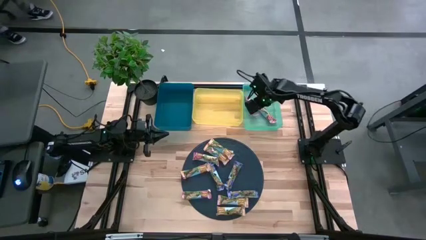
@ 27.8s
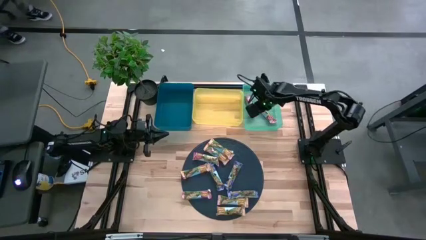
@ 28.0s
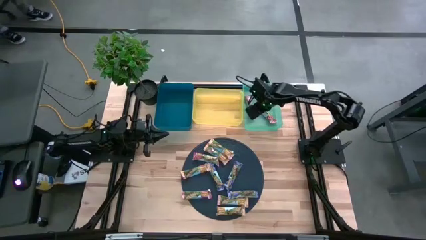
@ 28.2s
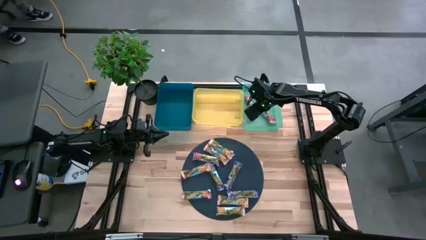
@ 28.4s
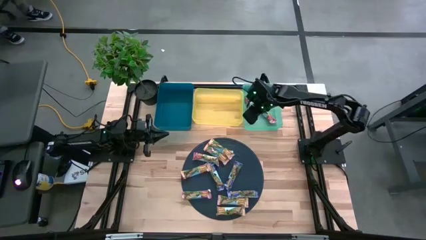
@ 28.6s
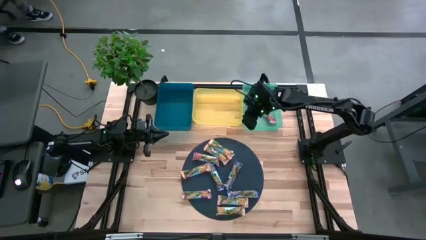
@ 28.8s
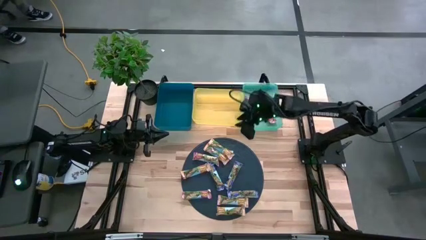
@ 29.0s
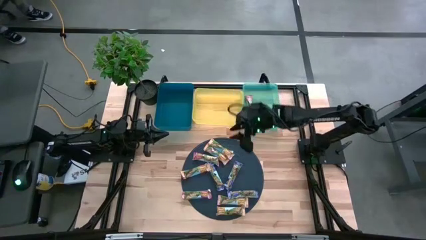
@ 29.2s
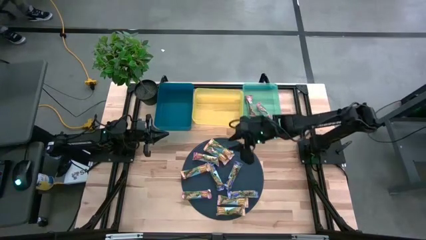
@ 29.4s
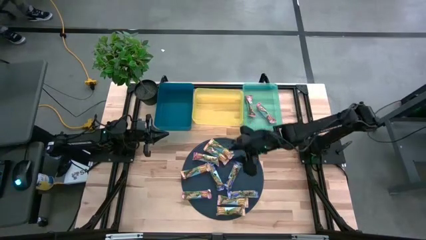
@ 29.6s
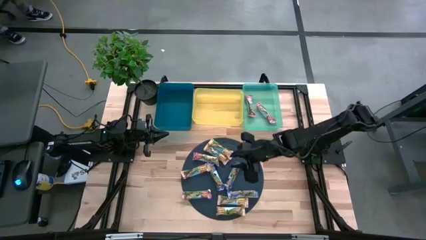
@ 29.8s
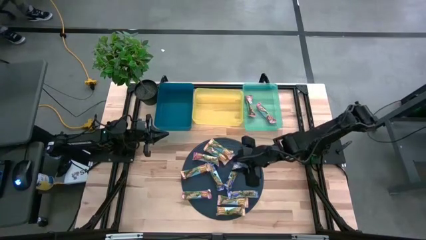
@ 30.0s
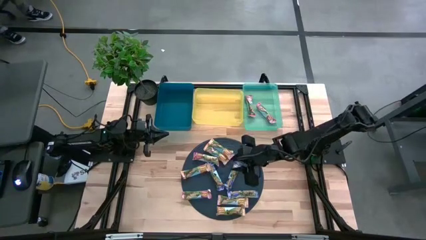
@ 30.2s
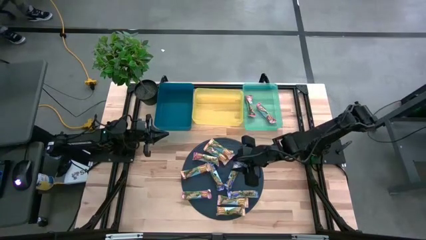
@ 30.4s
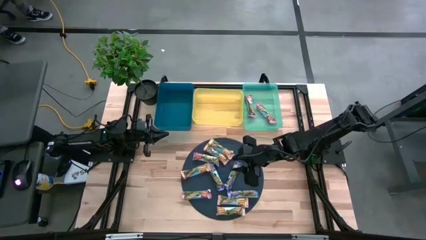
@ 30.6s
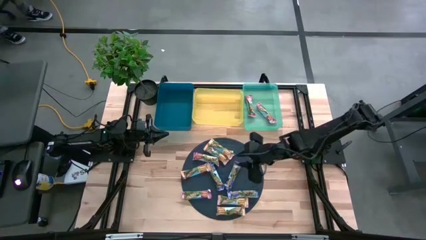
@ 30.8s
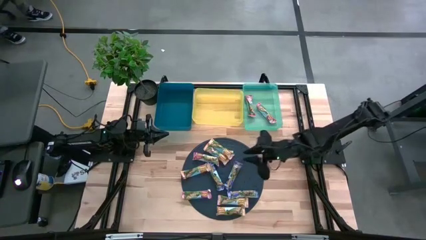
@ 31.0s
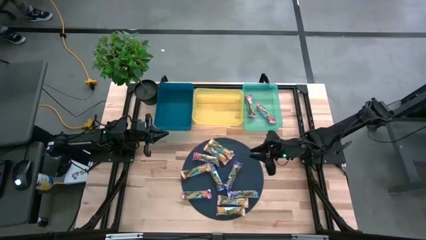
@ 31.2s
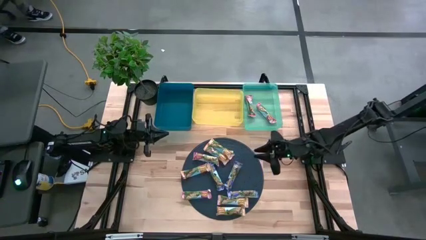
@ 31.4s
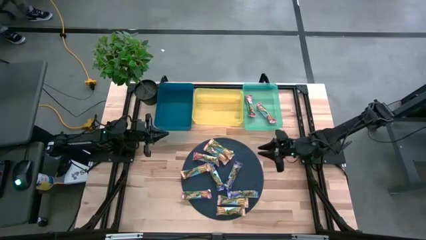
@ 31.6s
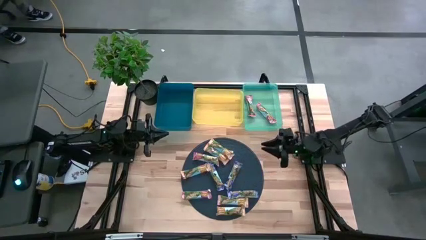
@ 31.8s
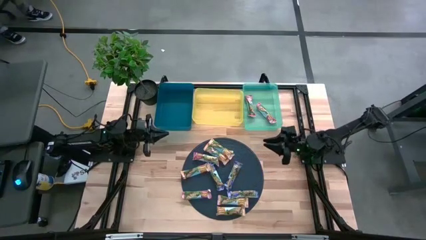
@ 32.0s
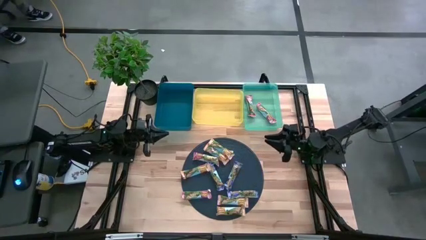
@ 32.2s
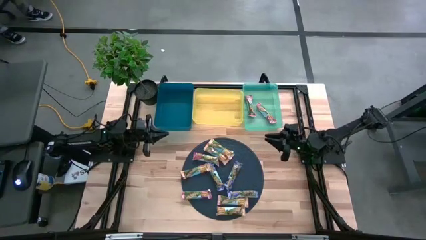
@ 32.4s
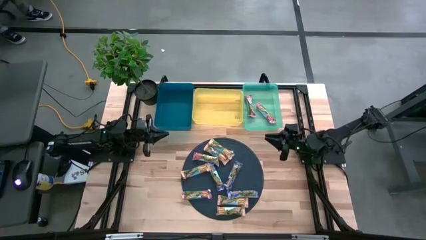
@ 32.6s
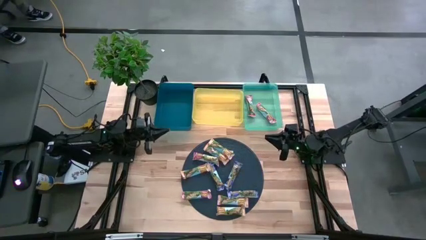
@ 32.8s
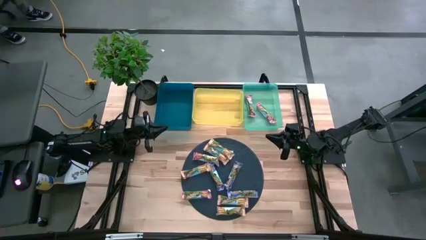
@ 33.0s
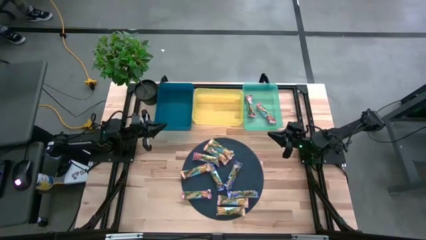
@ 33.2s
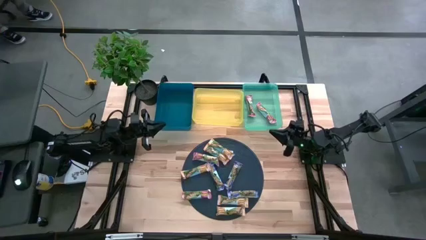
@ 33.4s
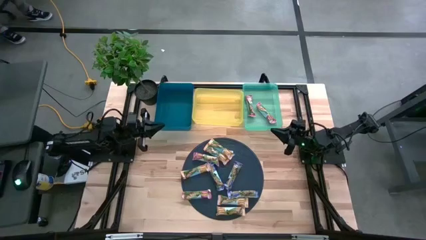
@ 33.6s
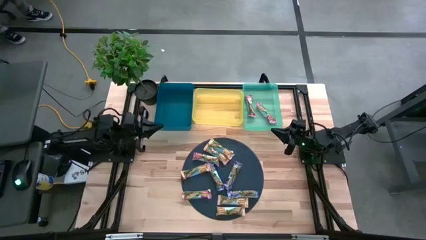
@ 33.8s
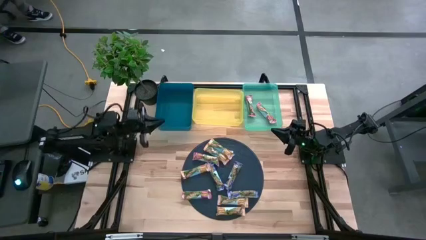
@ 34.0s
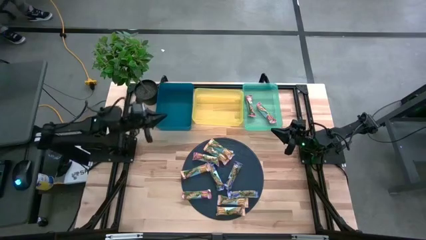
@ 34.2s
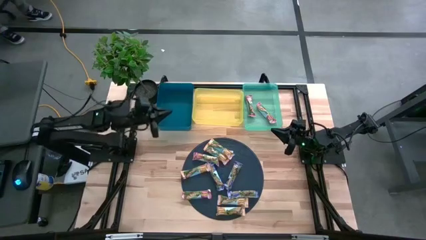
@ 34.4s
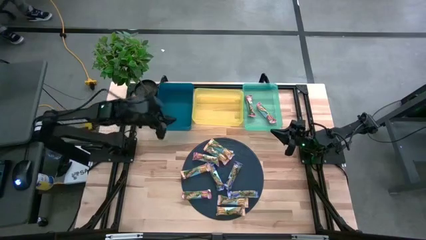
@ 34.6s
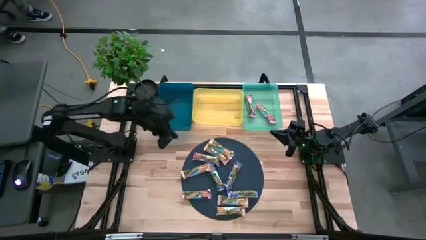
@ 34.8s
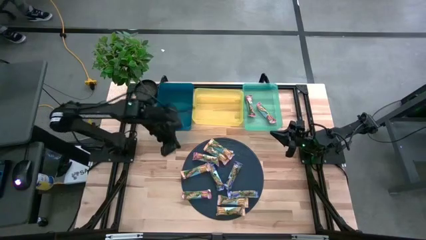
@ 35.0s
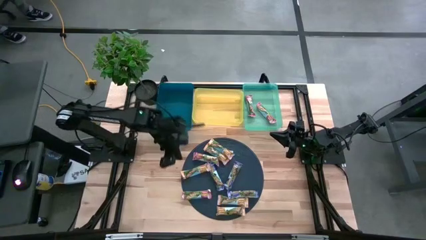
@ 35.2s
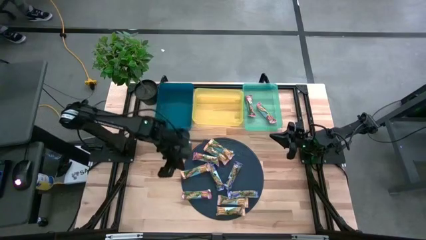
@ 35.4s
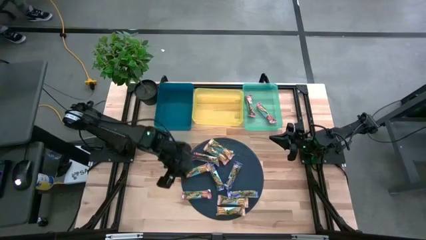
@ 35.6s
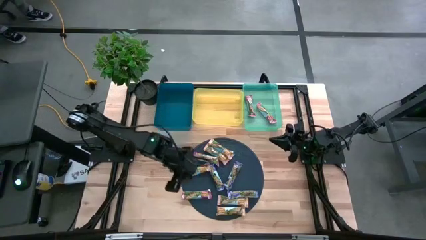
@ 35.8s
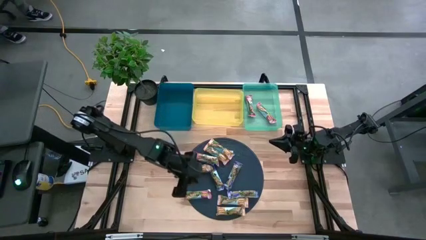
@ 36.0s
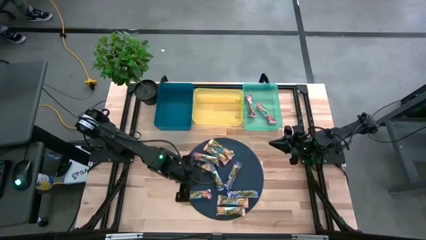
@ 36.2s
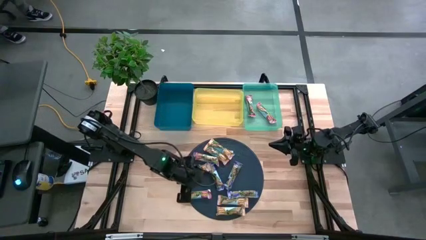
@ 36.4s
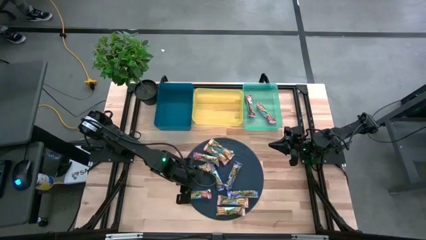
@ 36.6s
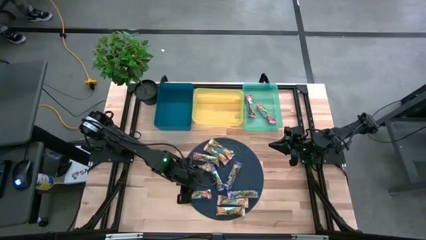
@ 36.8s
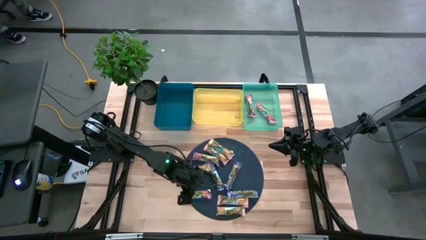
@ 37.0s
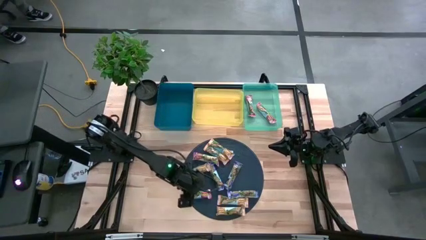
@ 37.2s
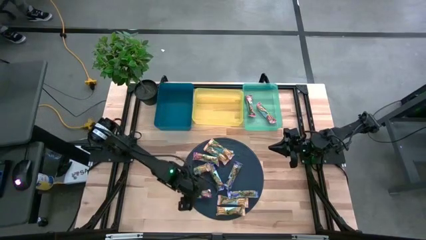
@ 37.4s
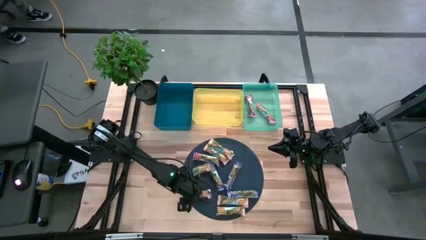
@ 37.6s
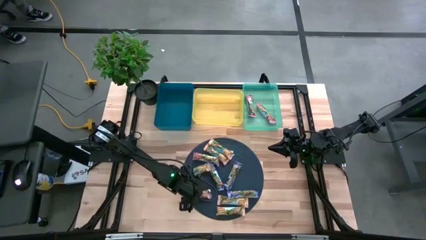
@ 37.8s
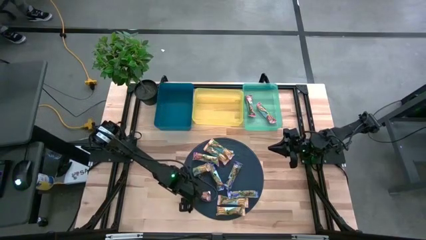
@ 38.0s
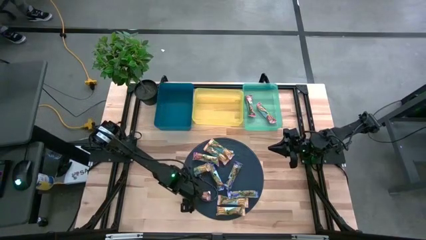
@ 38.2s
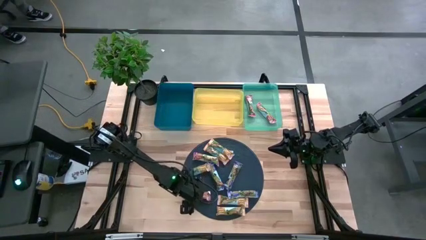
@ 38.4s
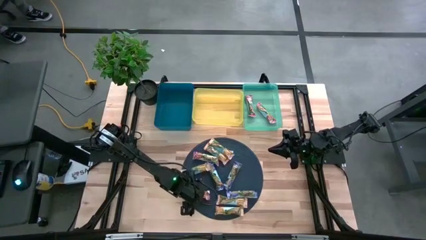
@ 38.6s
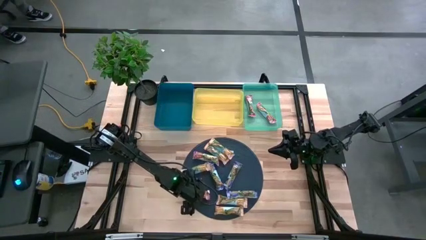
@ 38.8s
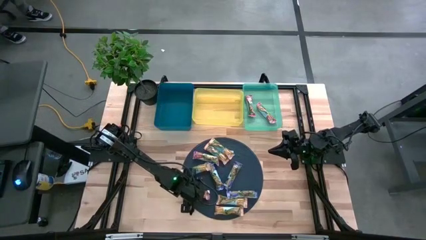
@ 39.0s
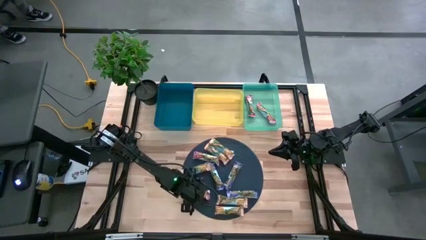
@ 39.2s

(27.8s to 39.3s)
Task: Pick and place Granola Bars by type
Put the red granola bar into the green bin
